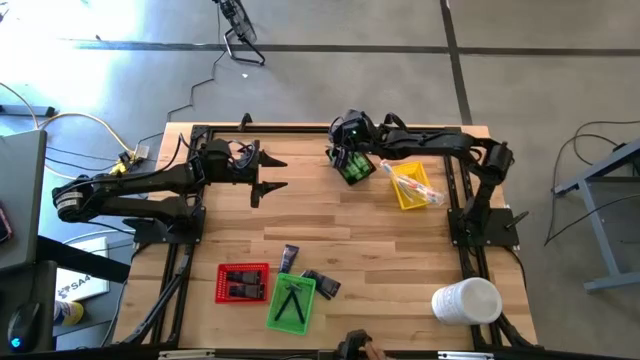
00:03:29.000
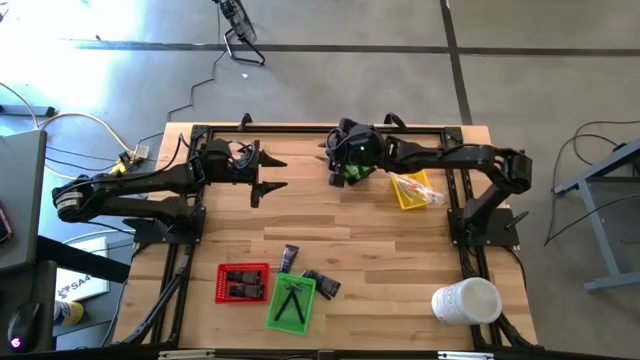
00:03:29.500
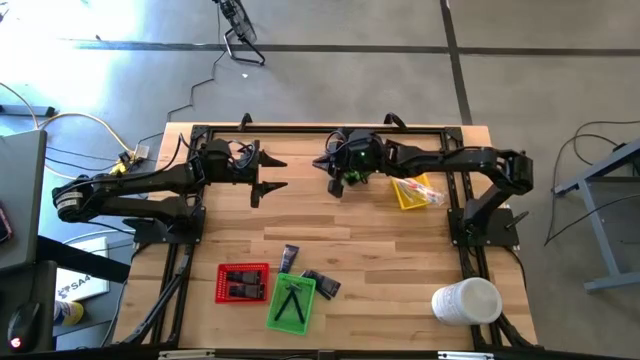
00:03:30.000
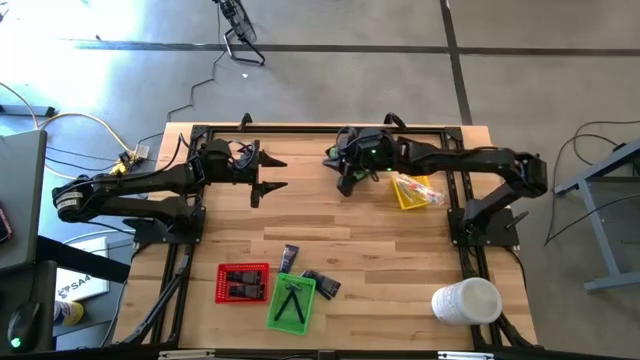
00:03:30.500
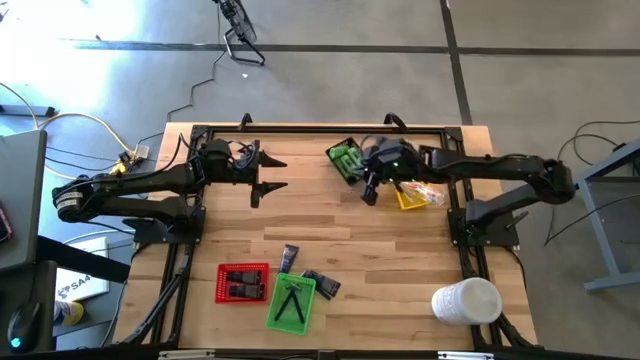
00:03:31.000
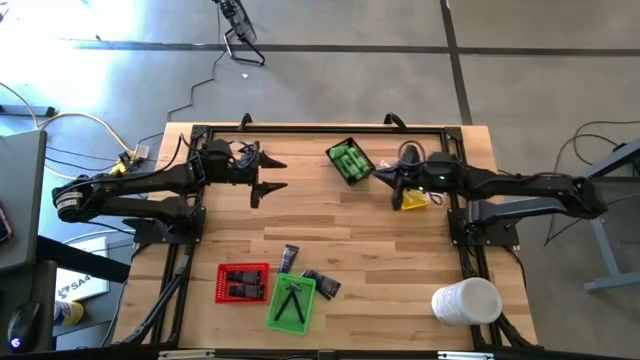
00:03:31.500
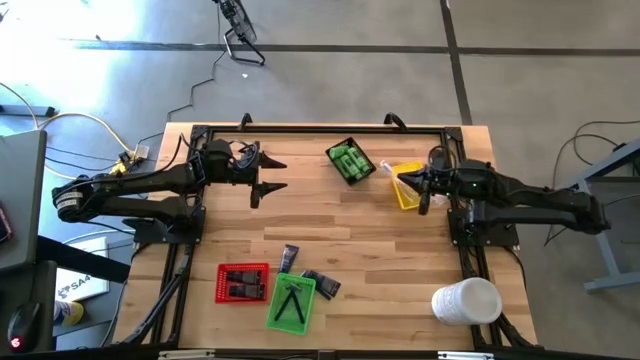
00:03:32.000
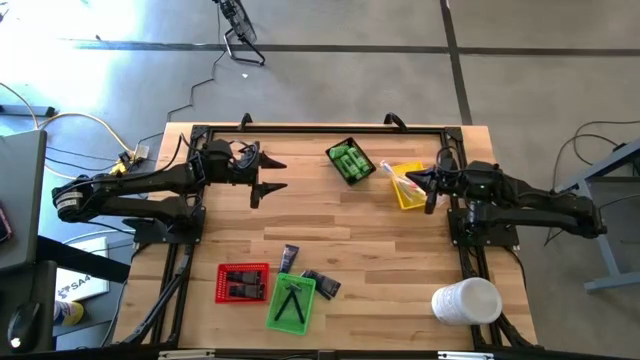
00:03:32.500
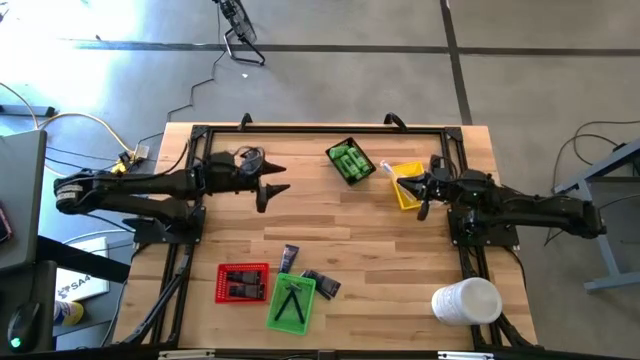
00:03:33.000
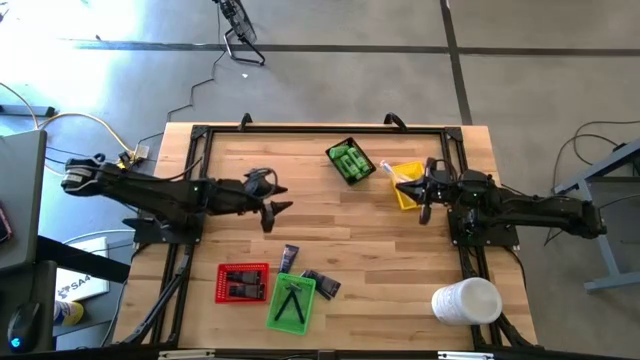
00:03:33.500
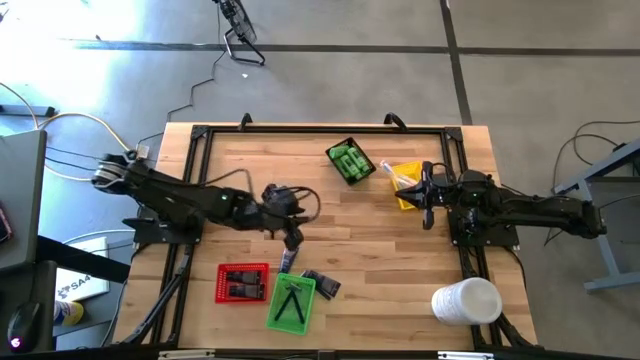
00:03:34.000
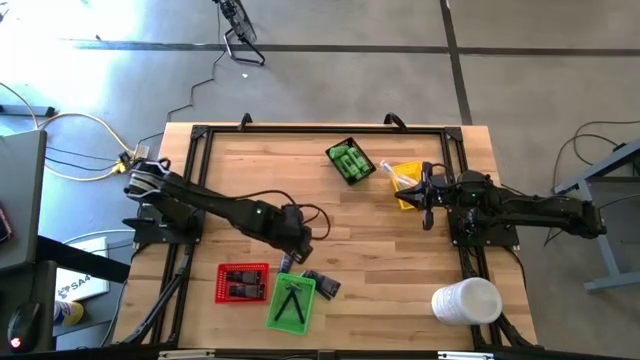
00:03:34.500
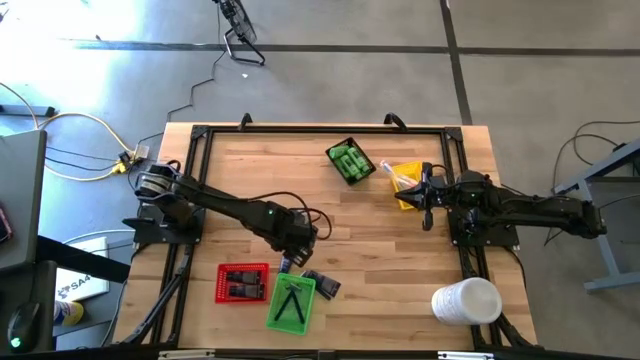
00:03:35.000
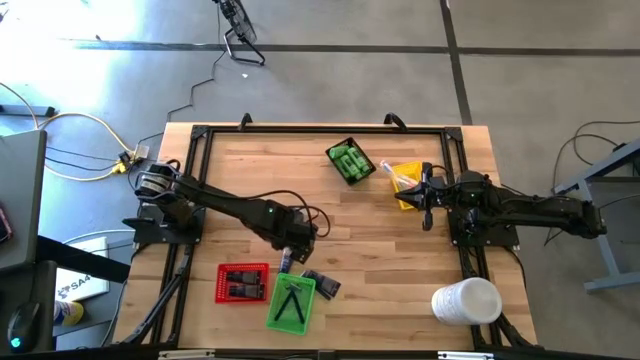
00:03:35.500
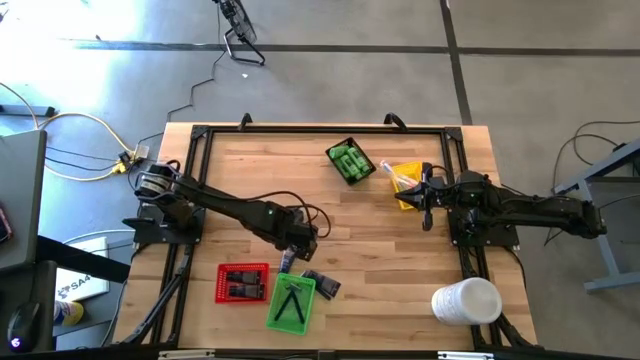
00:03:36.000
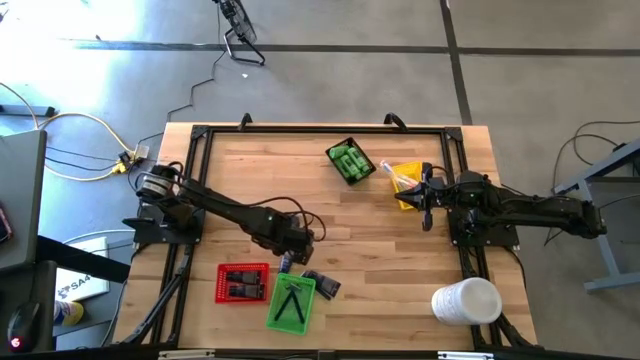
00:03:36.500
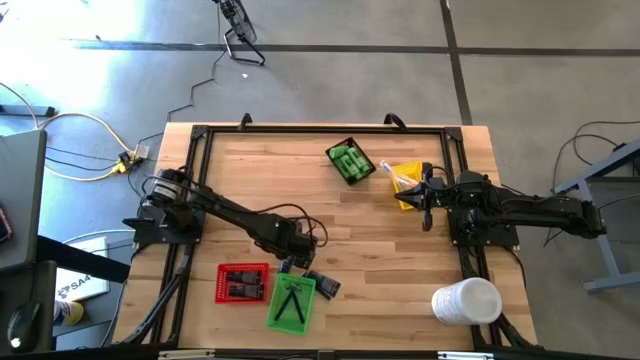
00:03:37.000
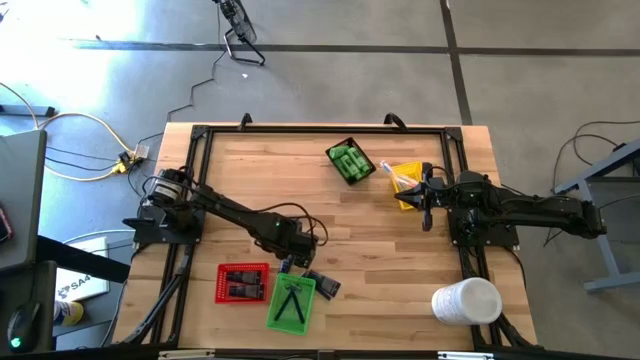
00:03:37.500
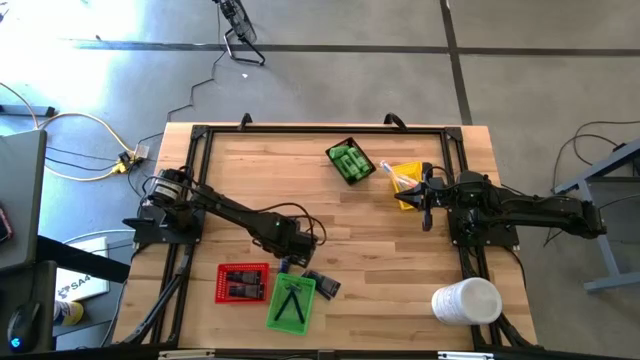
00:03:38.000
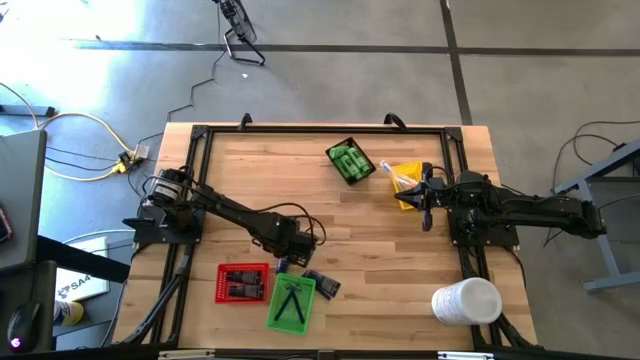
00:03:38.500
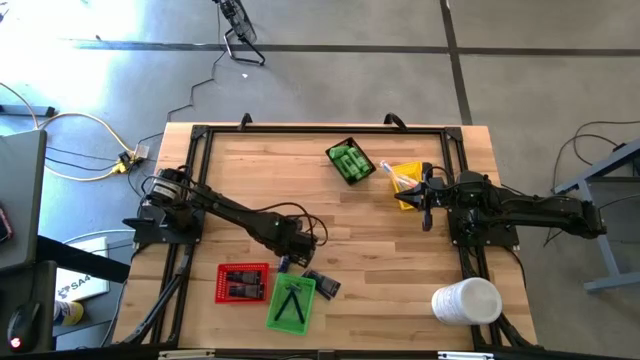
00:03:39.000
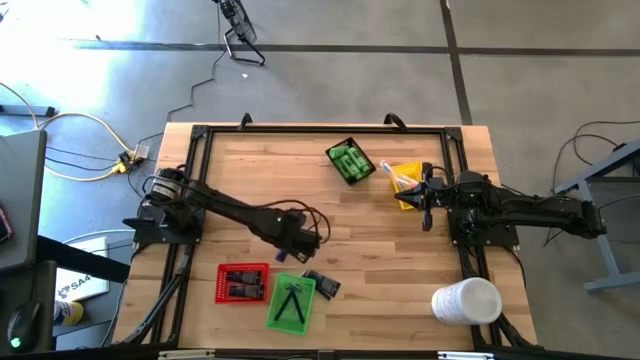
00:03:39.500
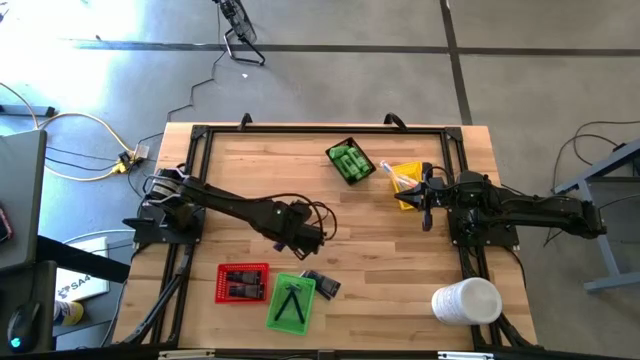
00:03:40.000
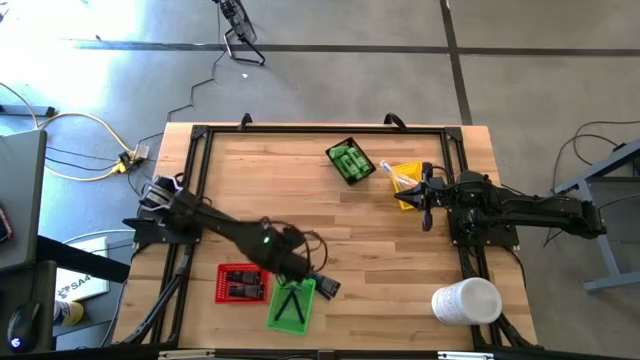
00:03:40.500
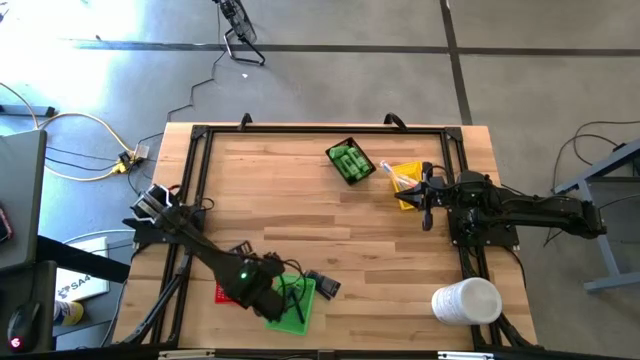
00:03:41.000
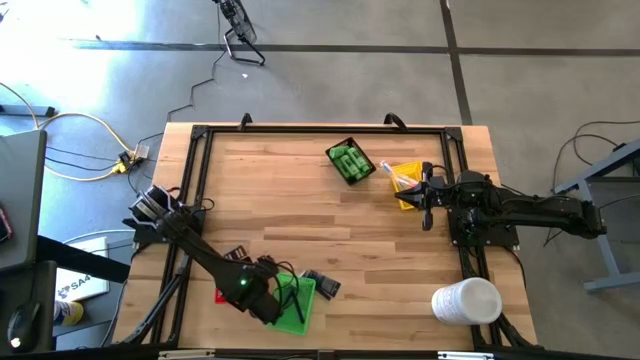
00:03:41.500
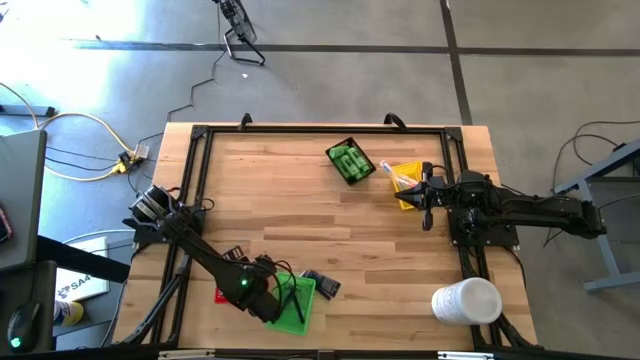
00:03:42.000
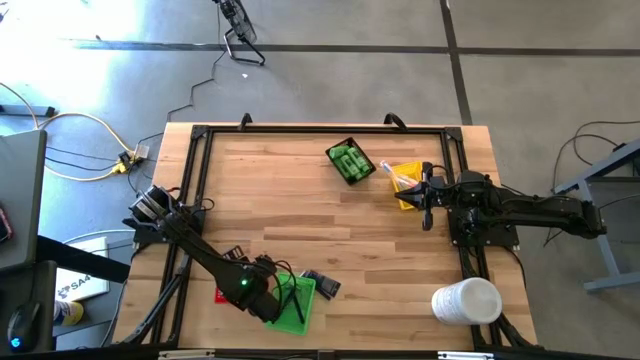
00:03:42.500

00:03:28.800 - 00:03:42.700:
Task: Pick & Place Travel size toiletries
Put the shave cream into the red bin

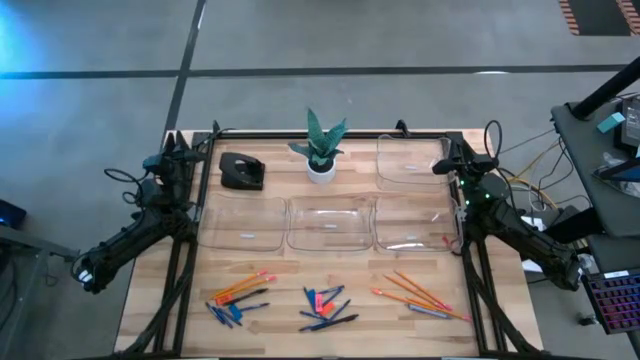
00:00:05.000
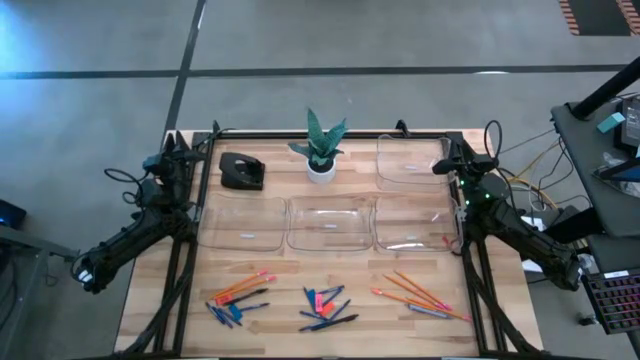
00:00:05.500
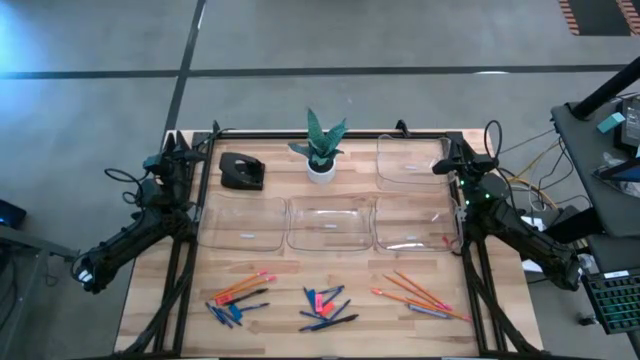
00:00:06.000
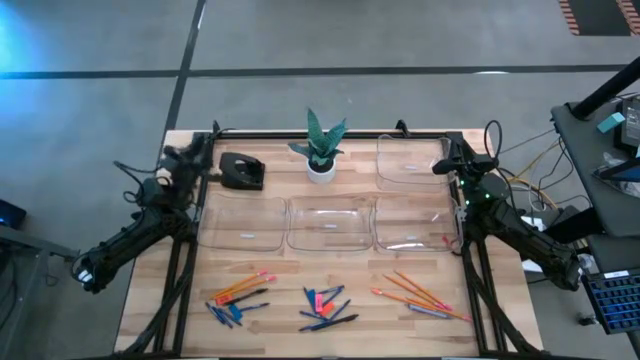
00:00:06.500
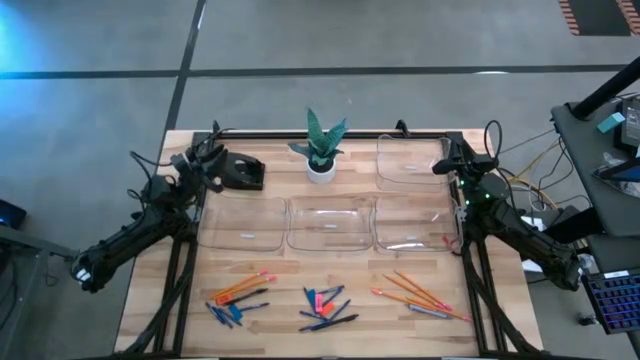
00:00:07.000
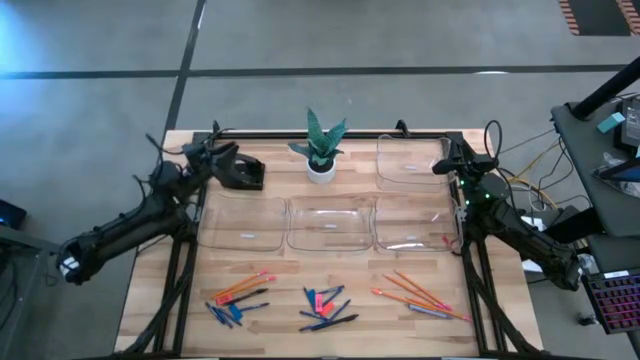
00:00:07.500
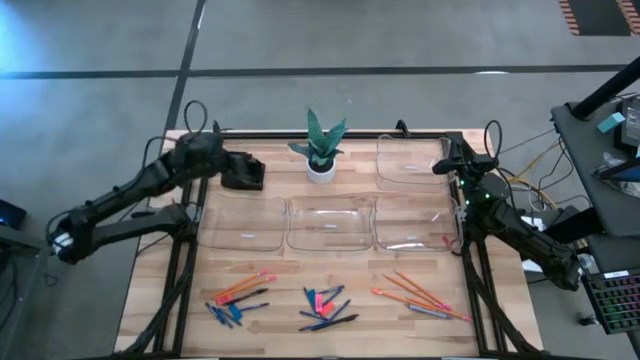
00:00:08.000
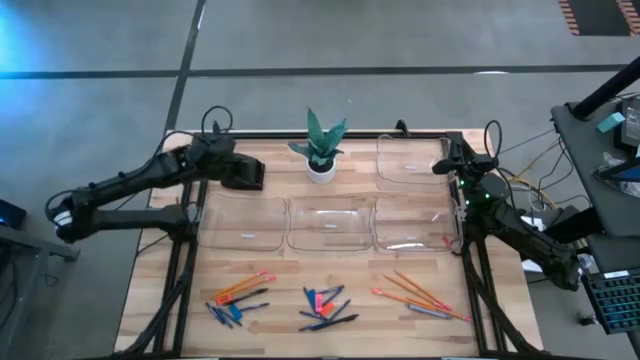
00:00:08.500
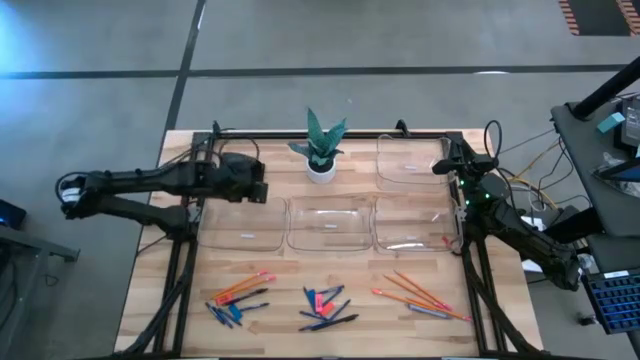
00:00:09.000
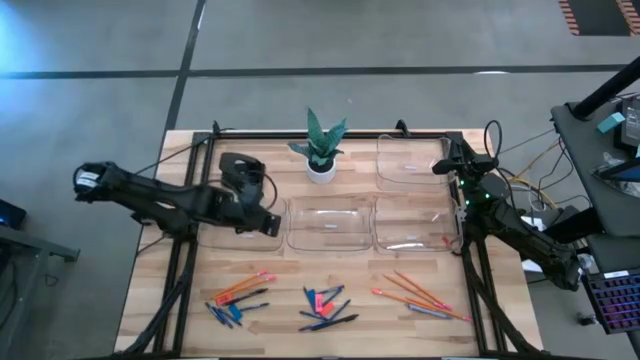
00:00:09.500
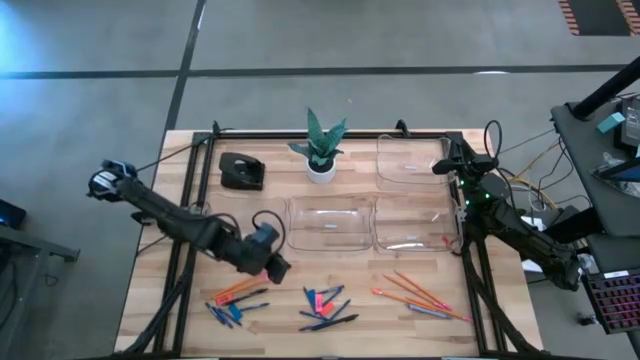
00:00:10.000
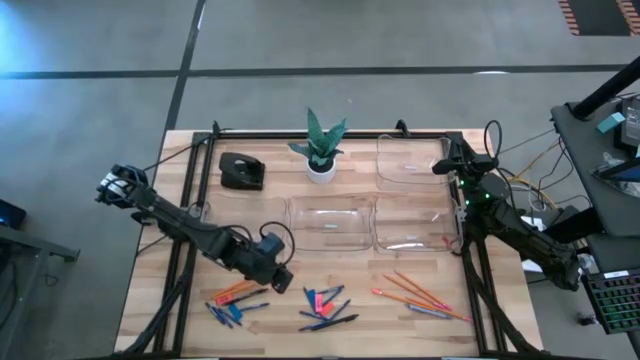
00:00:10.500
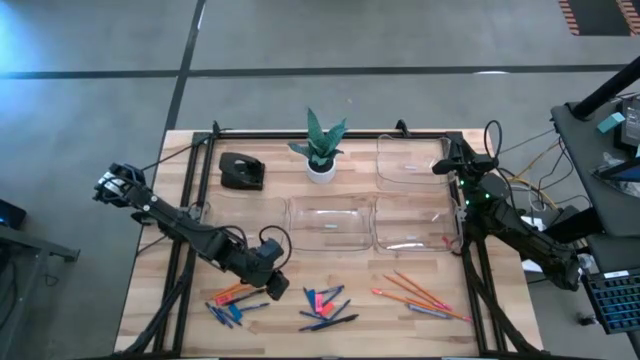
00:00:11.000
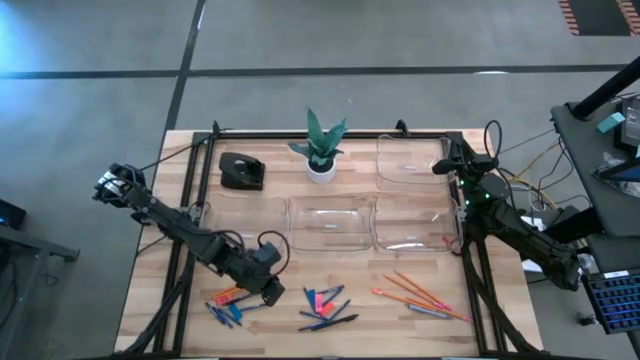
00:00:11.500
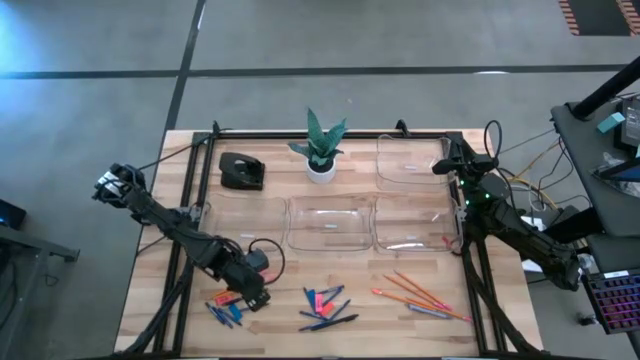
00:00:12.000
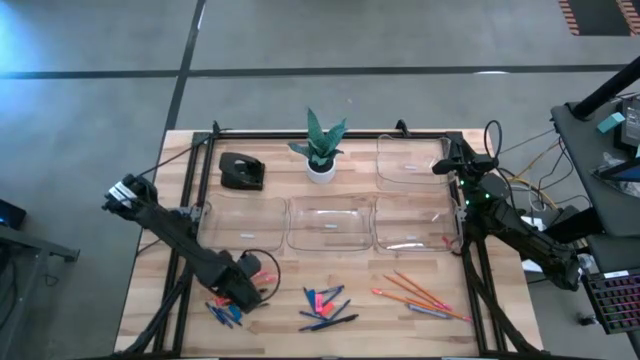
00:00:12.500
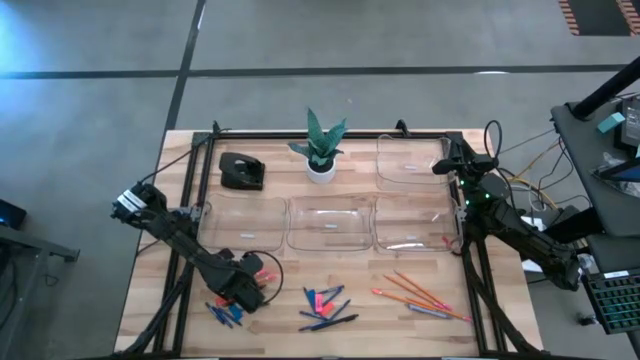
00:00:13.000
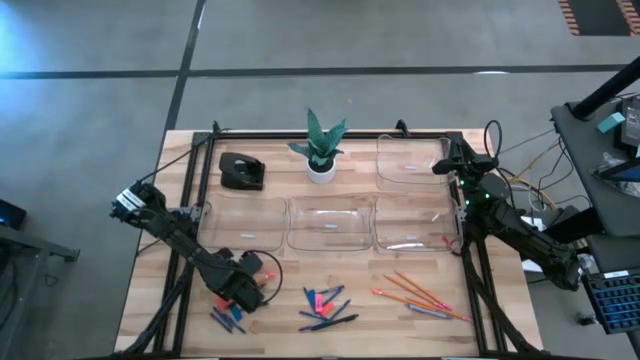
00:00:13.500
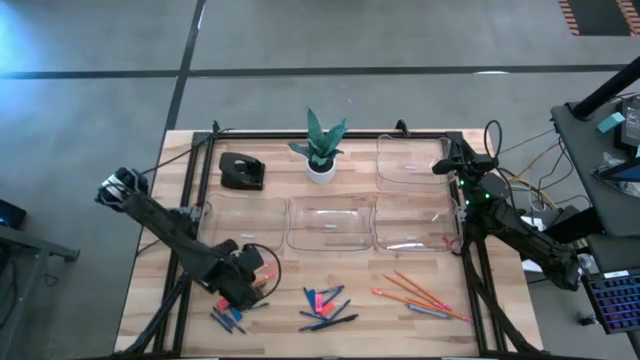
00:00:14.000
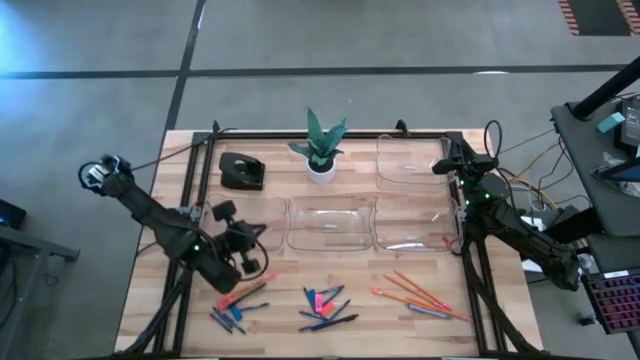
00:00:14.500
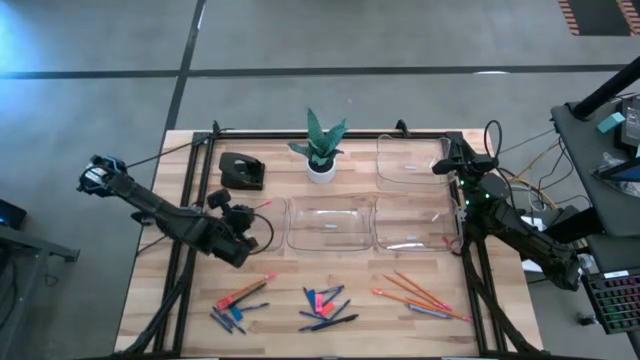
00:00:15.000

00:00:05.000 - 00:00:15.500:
Task: Sort crayons/erasers/pens/pencils in bins
Put the orange pencil into the middle left transparent bin
